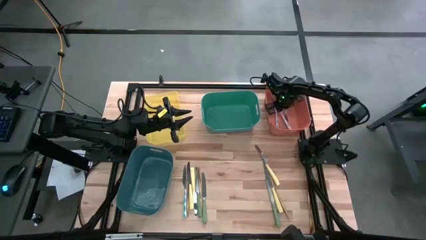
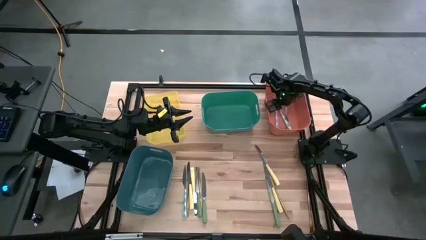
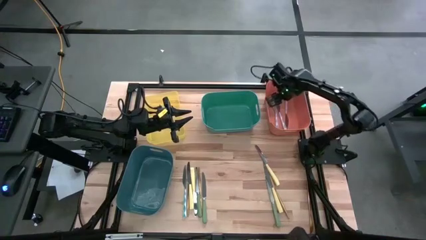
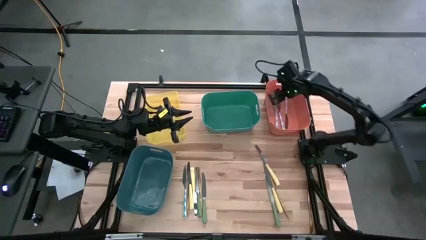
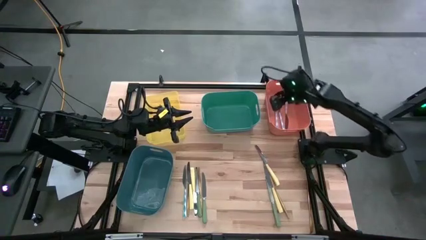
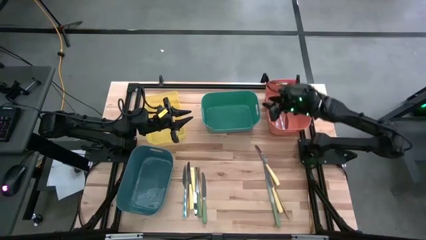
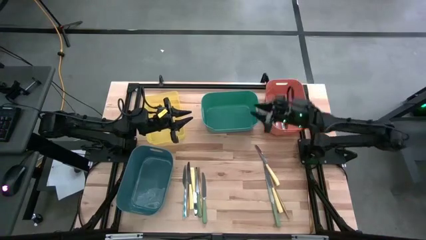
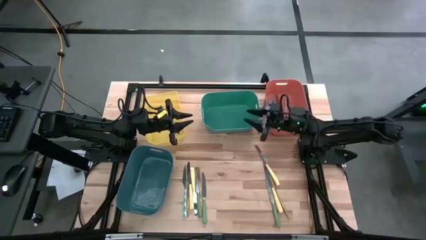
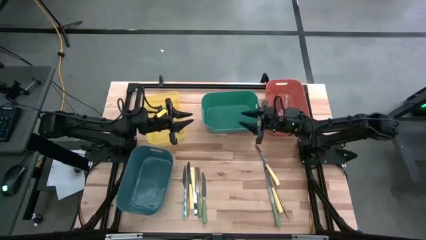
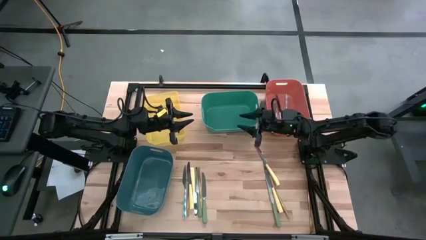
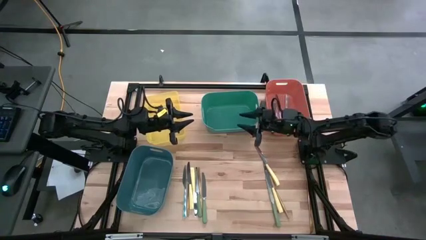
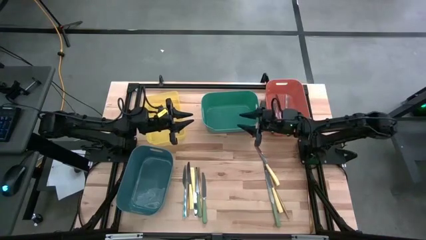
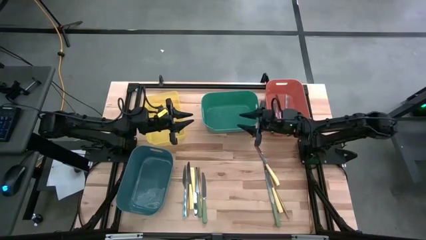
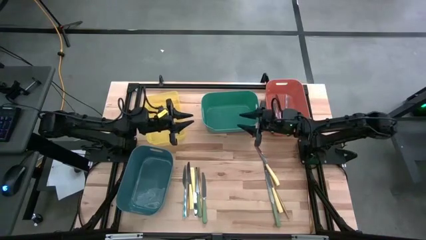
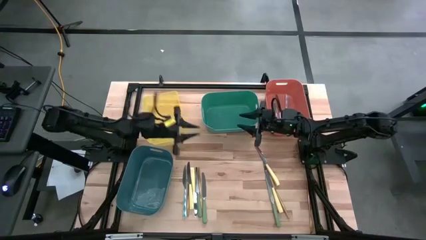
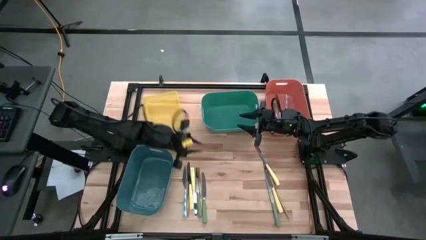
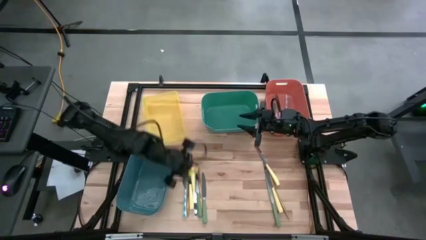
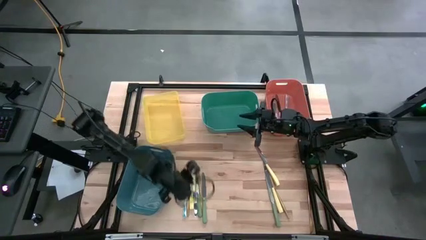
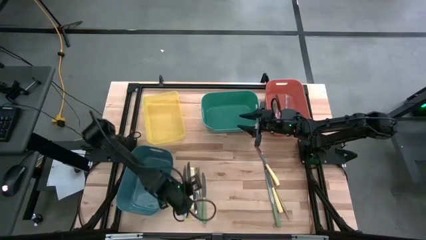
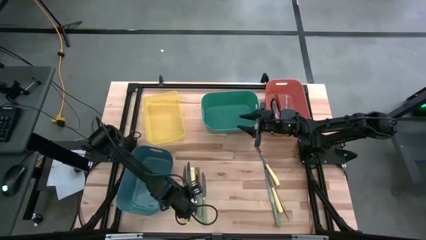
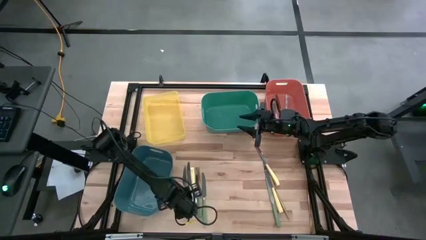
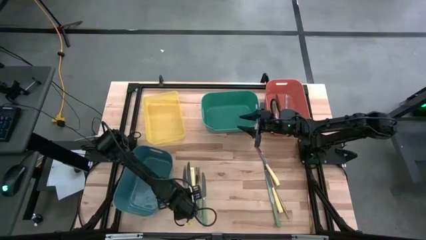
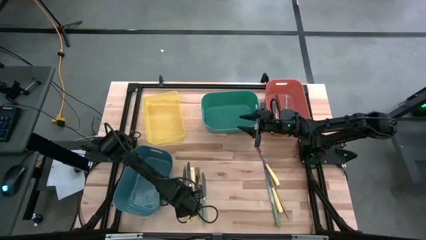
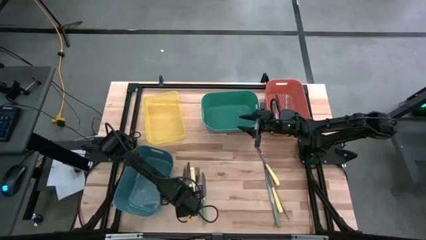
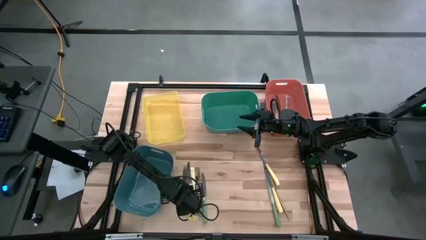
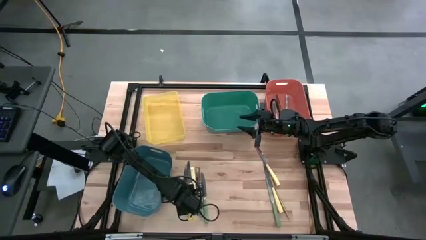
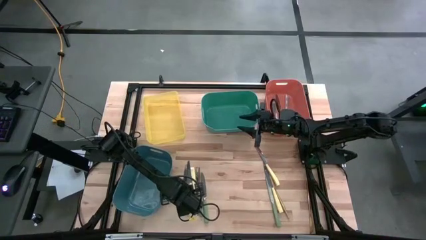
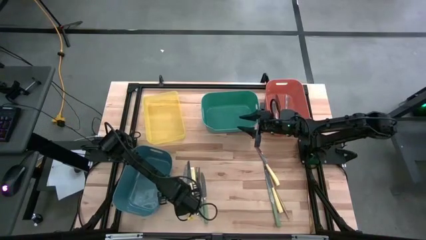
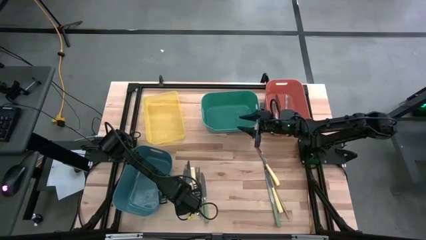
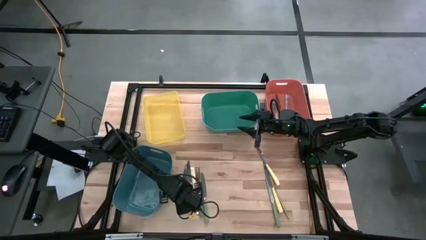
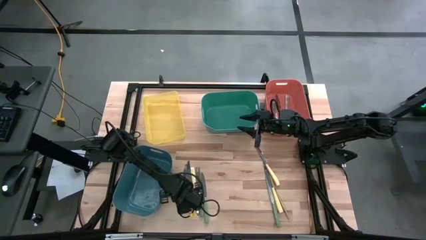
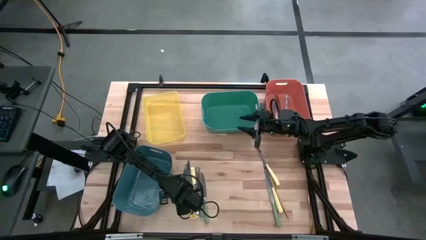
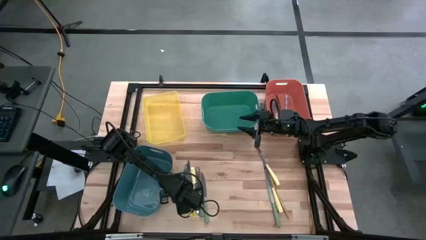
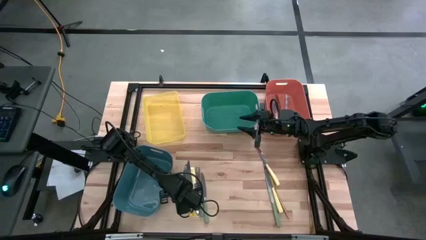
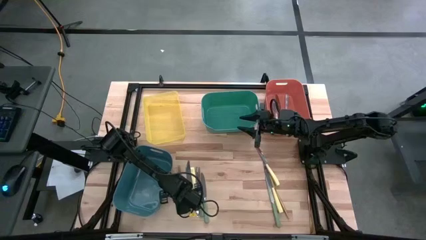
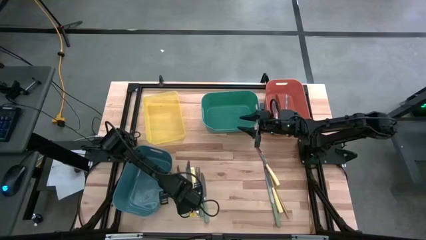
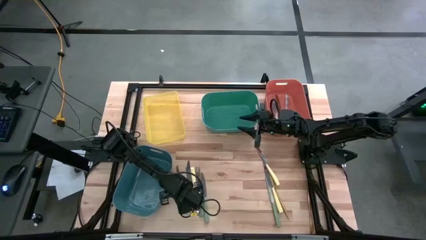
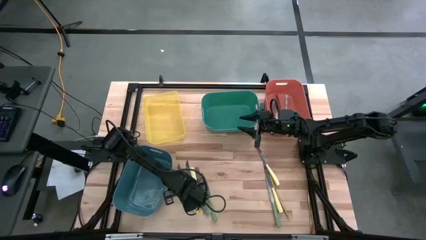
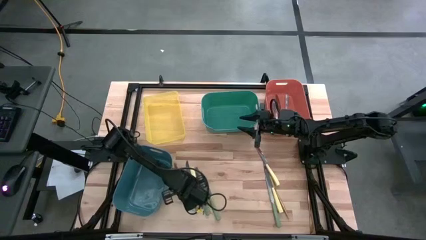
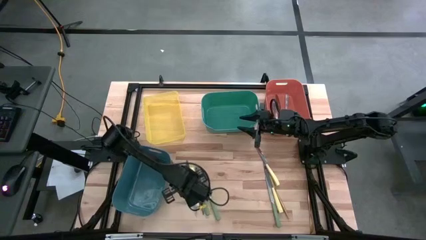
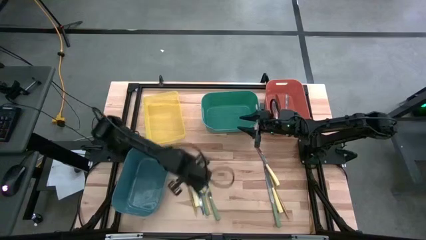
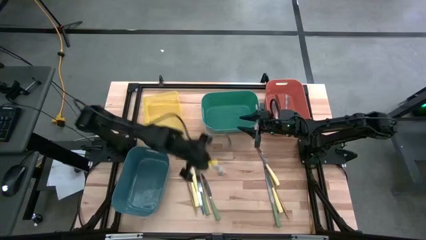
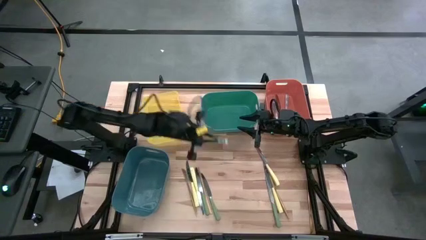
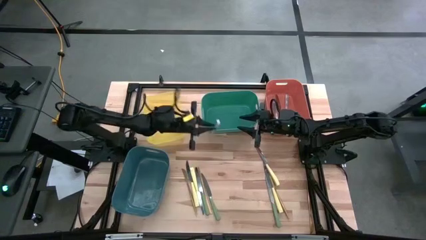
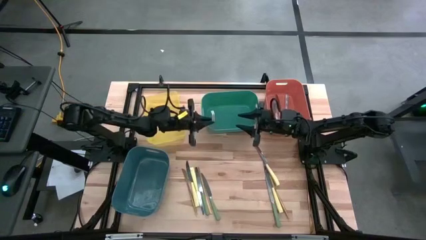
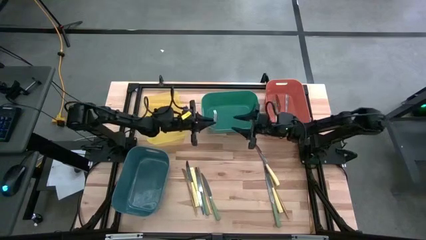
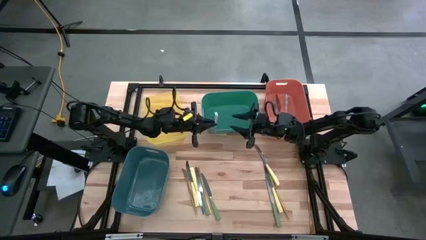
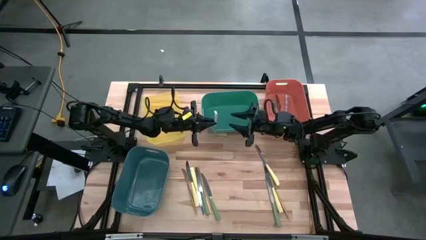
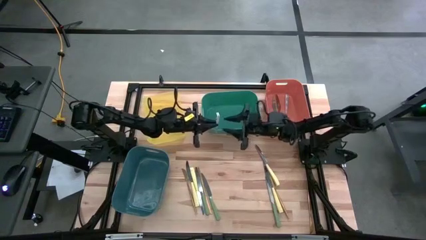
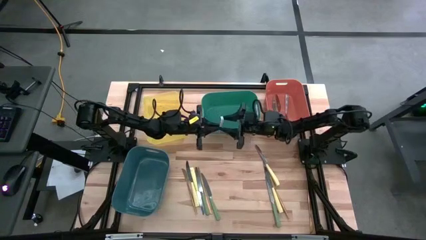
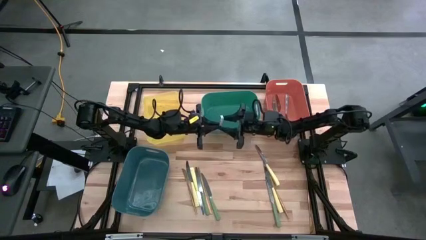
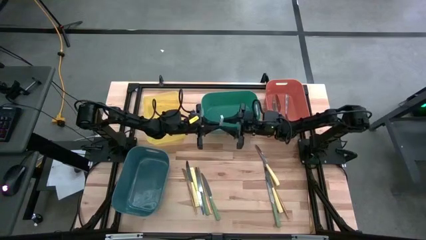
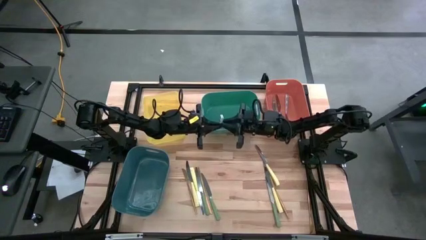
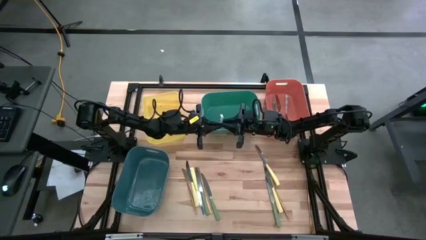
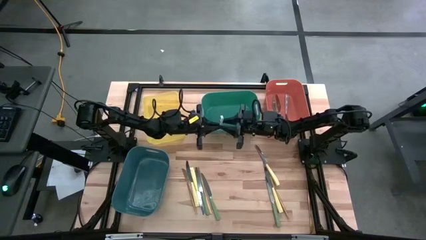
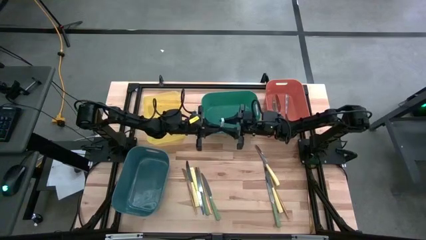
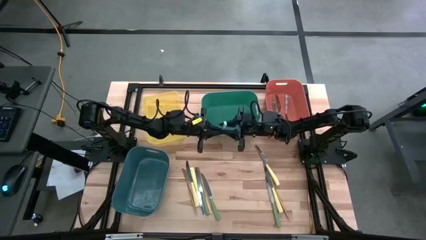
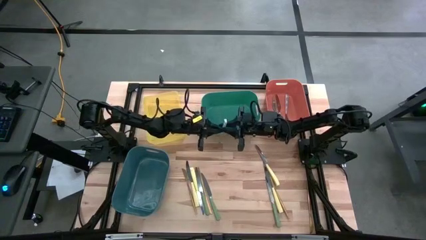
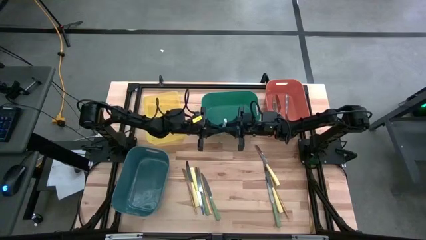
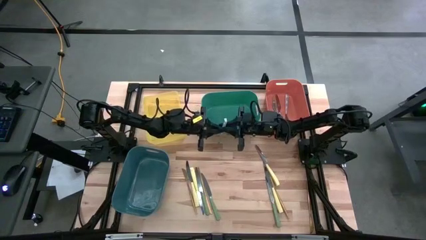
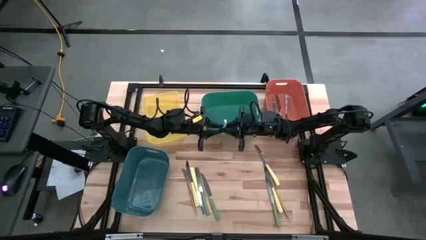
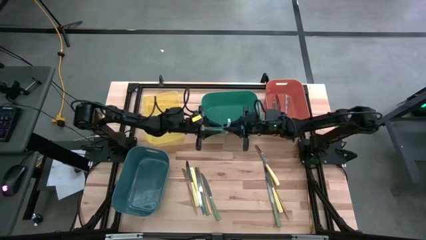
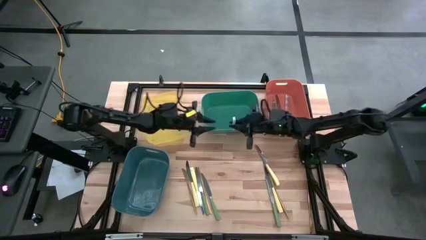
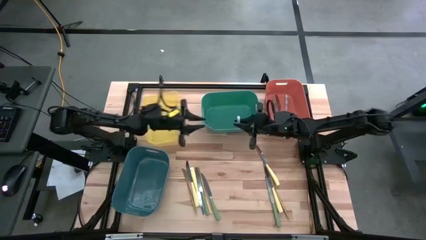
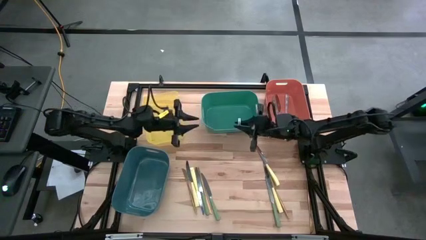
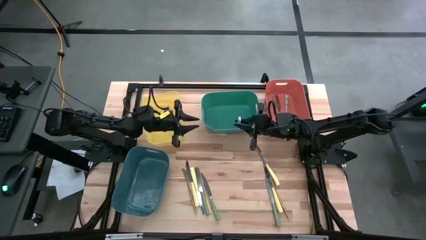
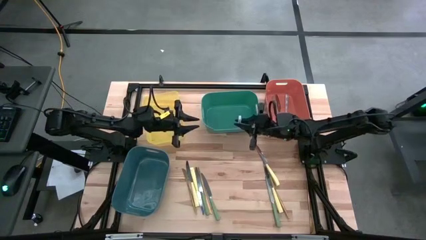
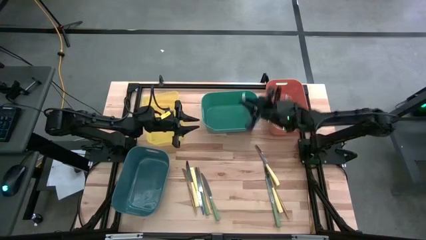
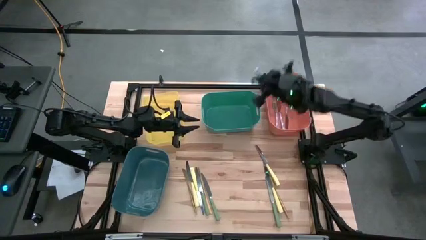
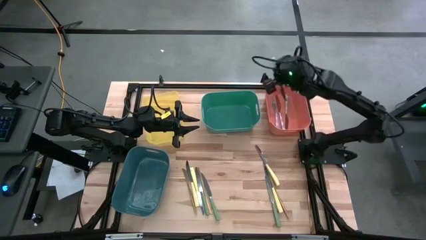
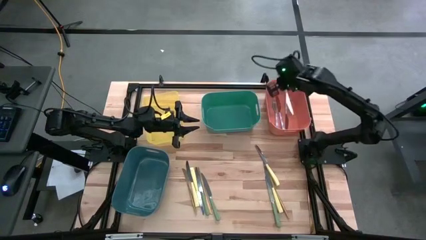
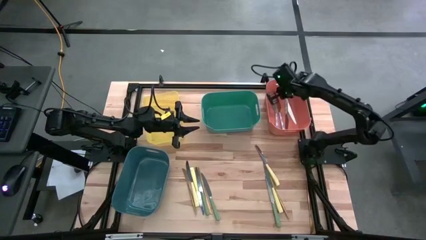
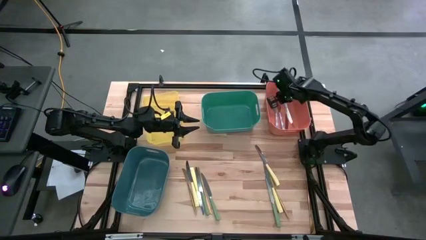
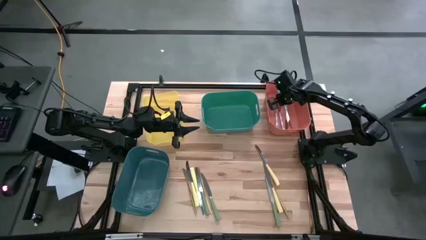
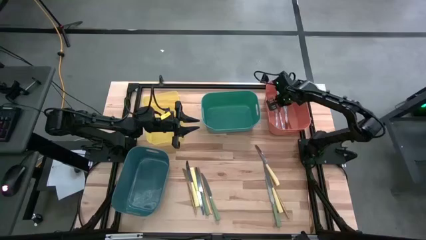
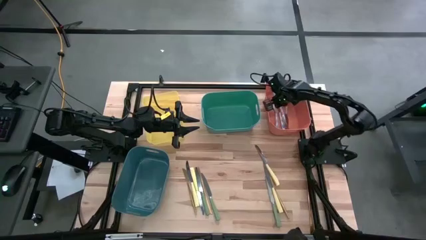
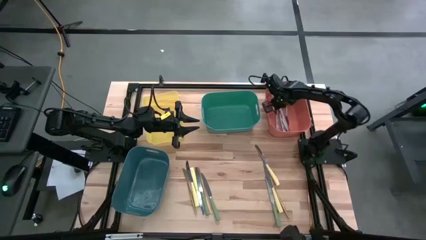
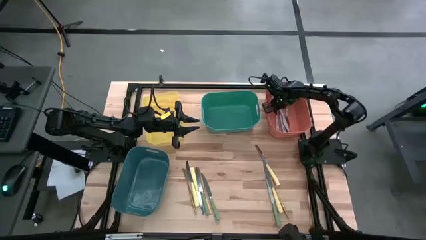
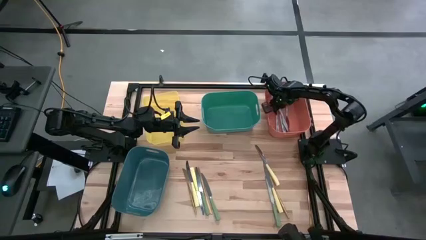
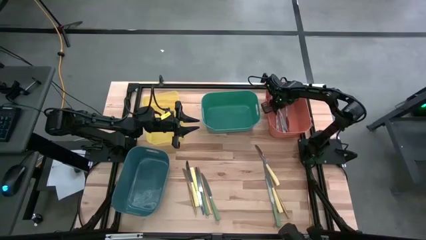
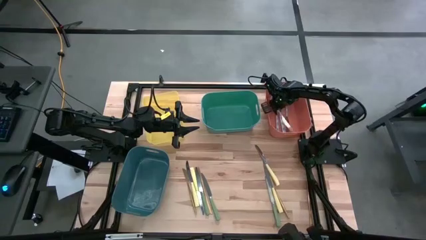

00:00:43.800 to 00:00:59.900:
Task: Sort silverware by color (type)
Put the blue patterned knife into the orange bin
